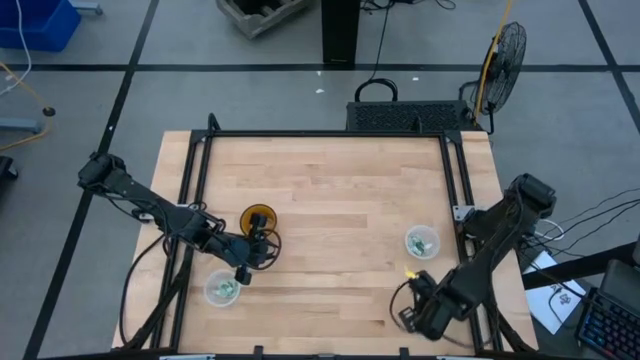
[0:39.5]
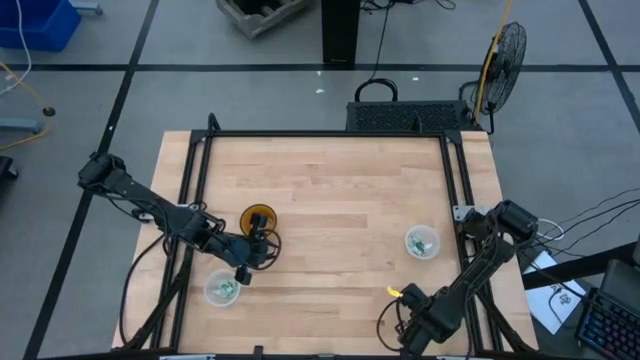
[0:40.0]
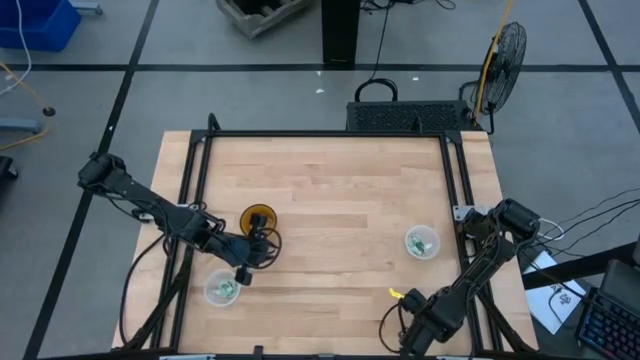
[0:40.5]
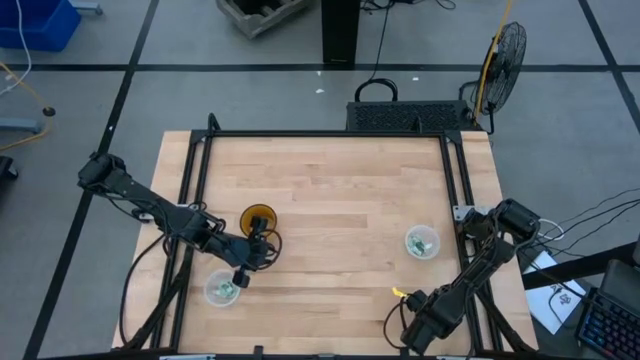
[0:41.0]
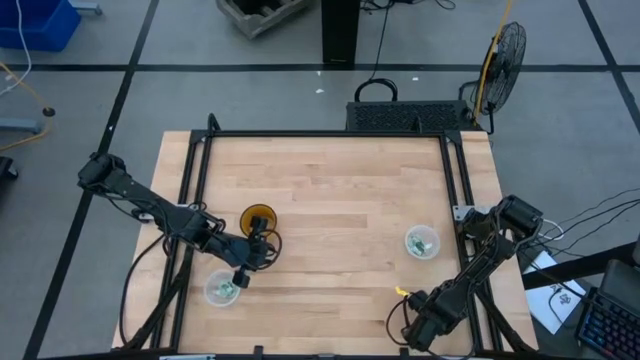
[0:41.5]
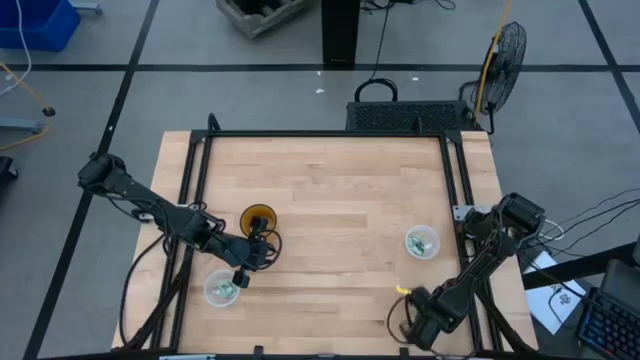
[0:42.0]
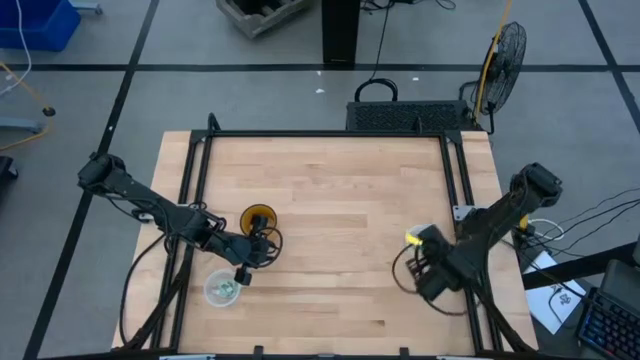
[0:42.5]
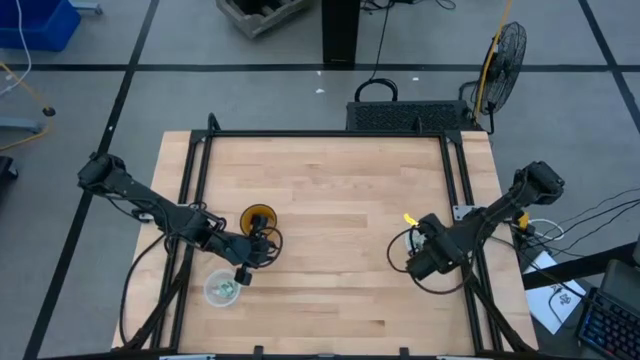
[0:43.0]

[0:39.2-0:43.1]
Task: Pick and place Stevia / Truvia into bins
Put the stevia packet into the right transparent container

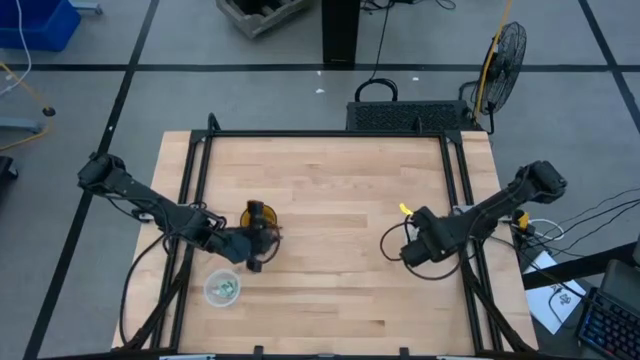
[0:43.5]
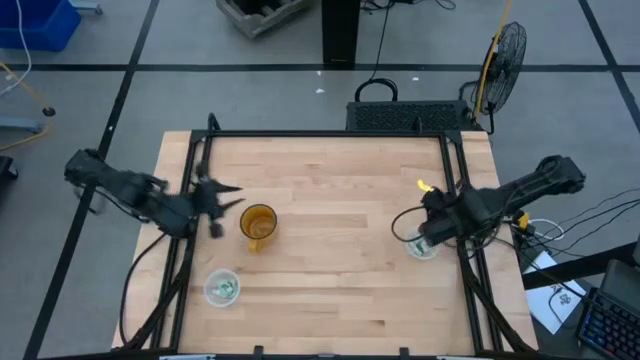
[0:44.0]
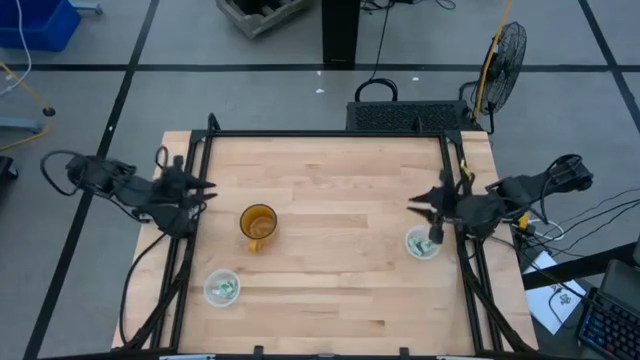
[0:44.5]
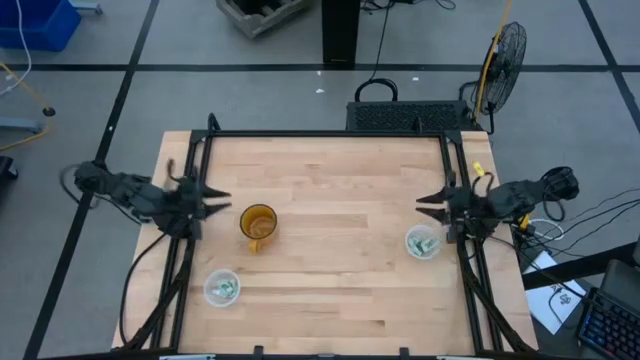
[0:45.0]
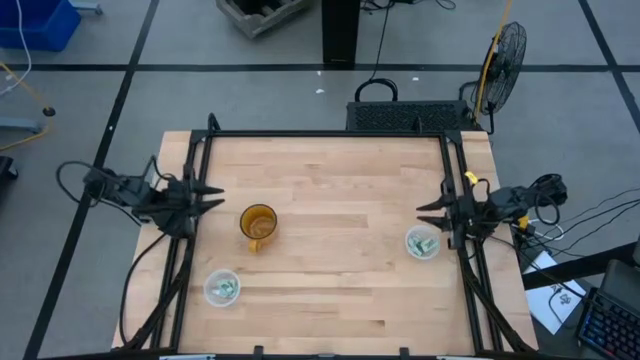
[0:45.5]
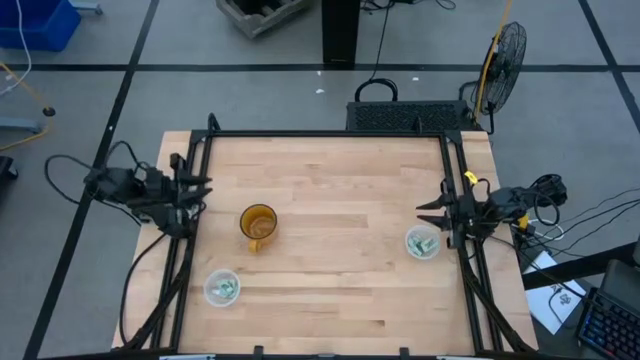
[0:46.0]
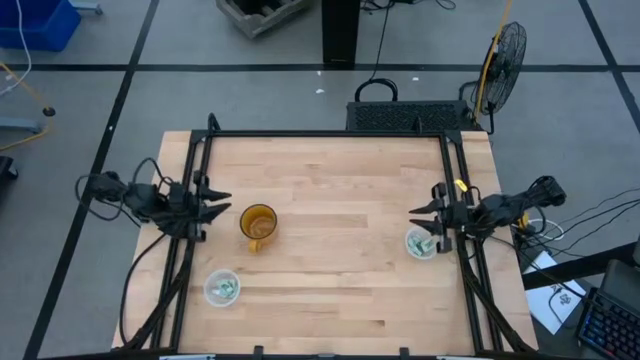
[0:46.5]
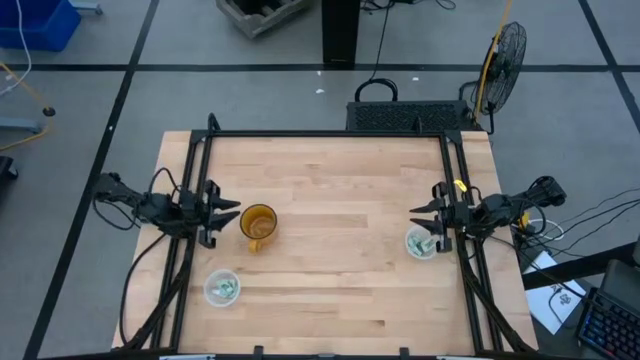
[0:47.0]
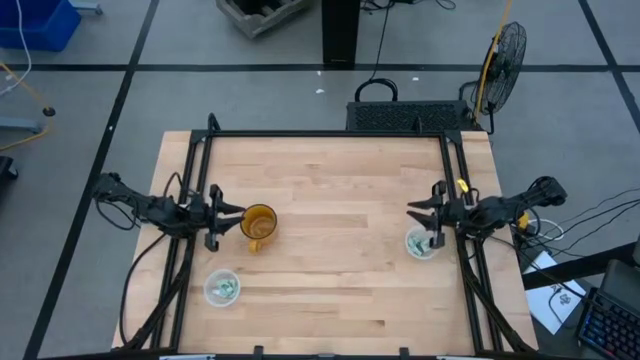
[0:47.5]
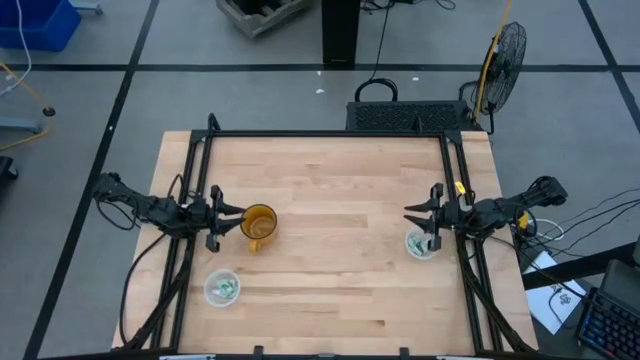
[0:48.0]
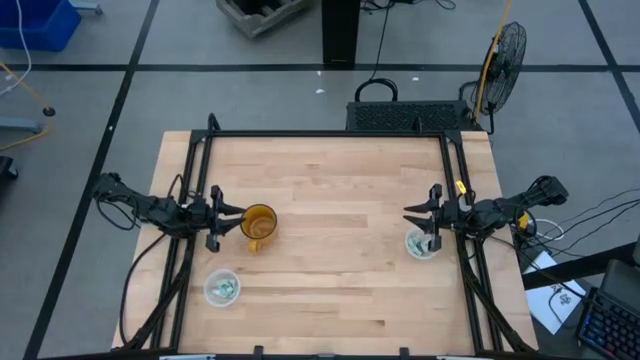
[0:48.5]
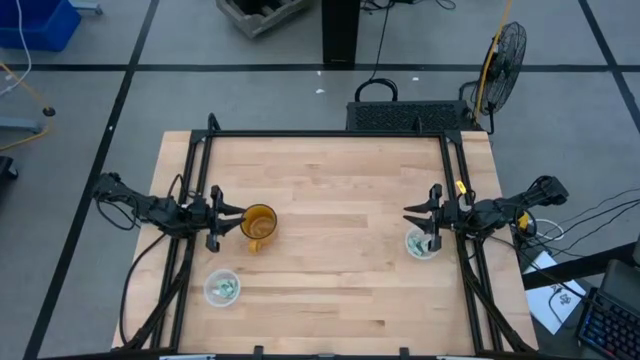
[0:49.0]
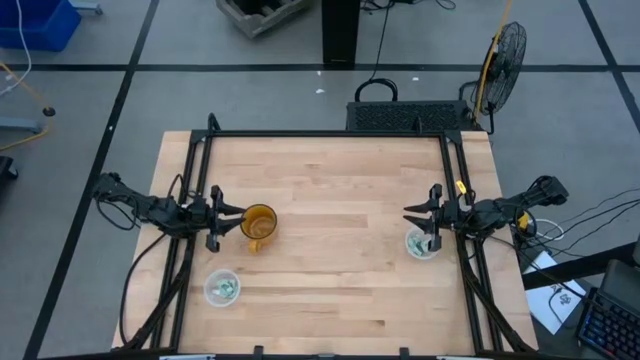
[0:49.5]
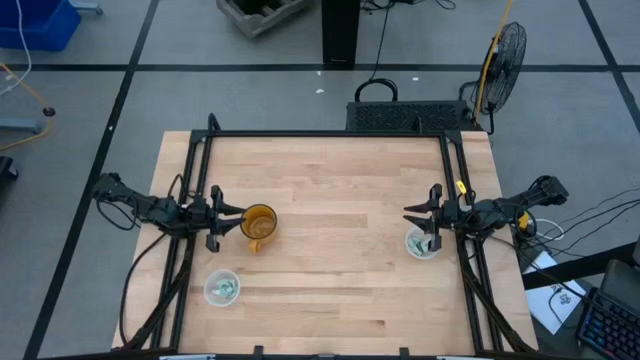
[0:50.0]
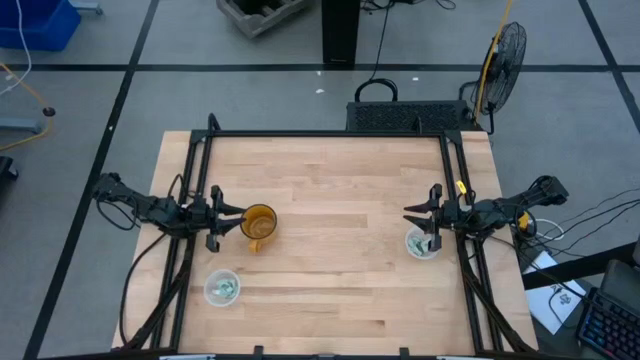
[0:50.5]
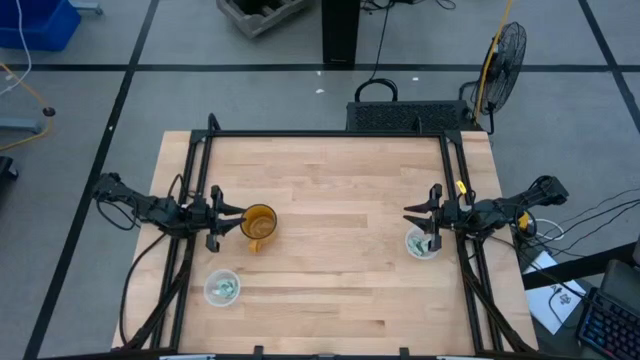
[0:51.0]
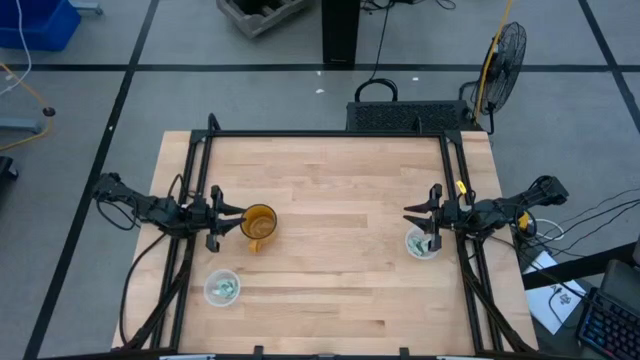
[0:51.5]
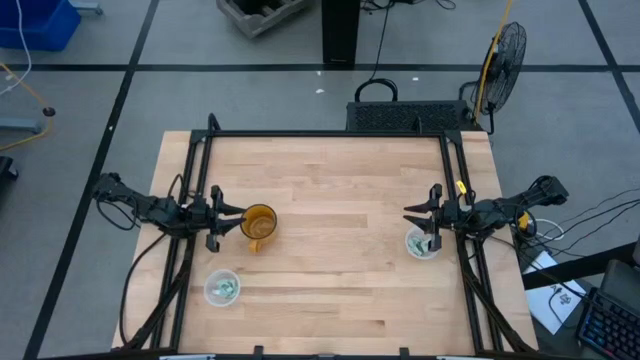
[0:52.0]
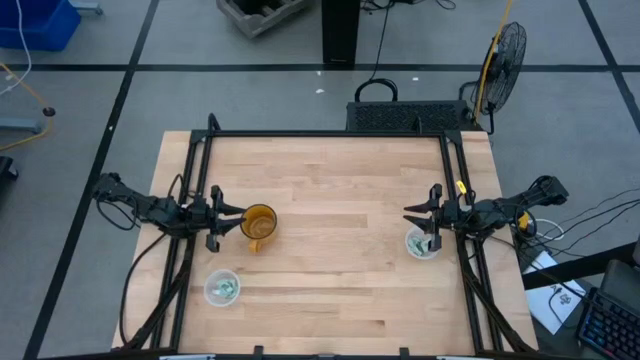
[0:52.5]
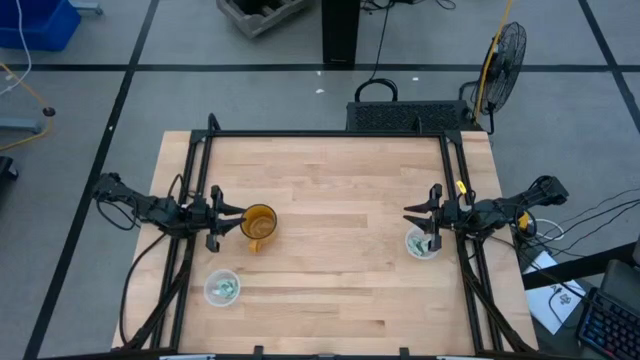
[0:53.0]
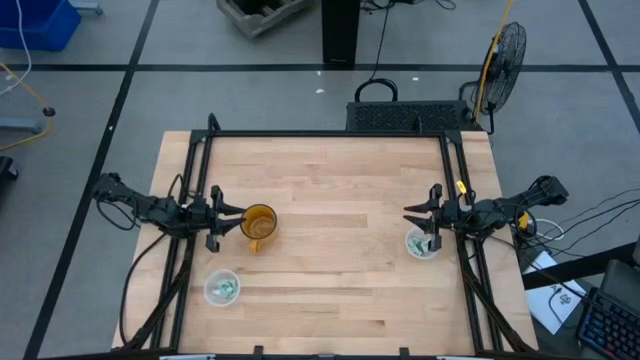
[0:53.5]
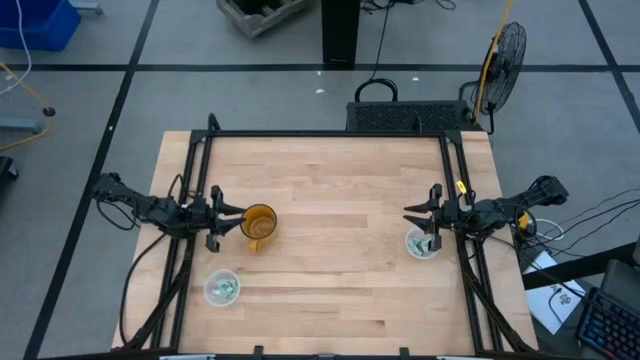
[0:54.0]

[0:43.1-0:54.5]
Return to Home Position

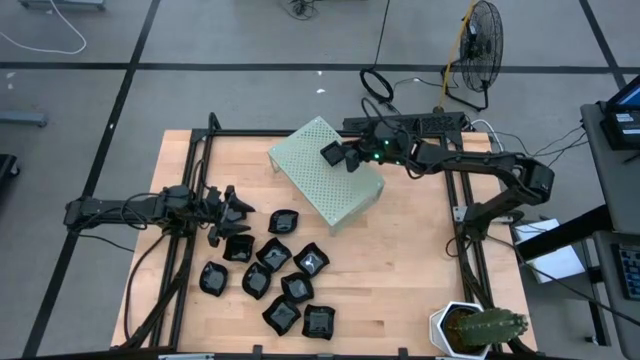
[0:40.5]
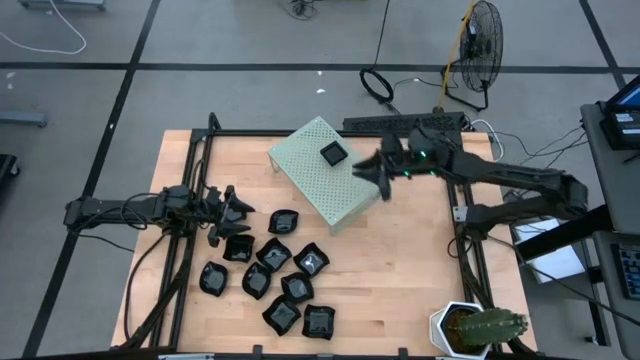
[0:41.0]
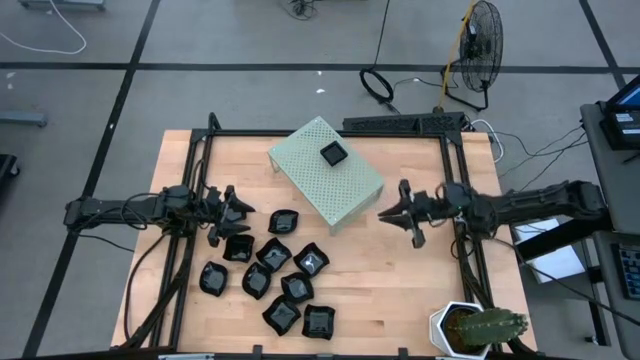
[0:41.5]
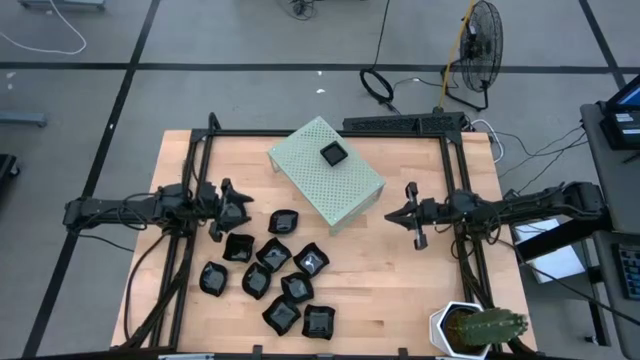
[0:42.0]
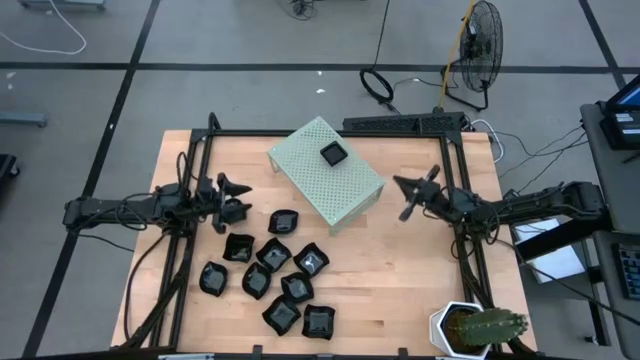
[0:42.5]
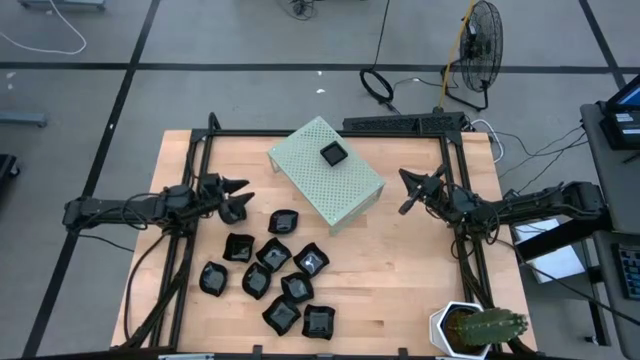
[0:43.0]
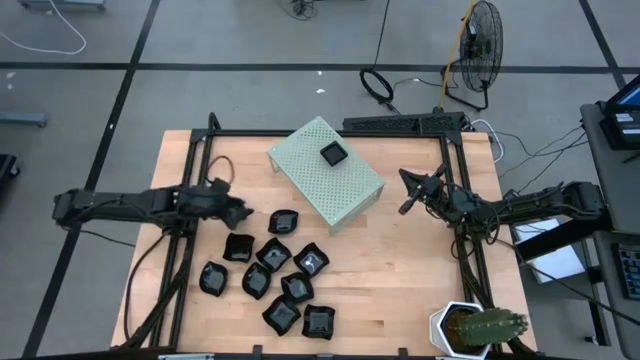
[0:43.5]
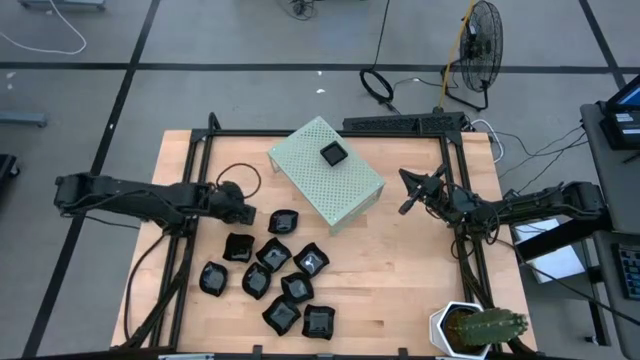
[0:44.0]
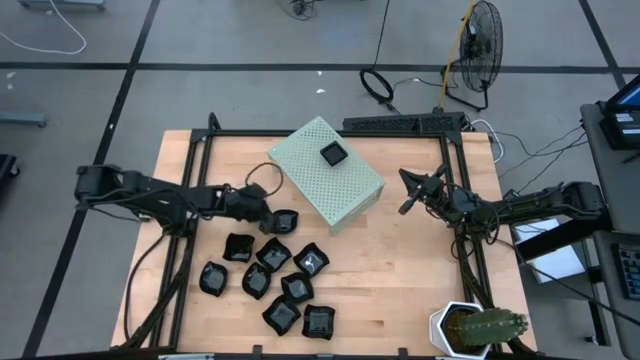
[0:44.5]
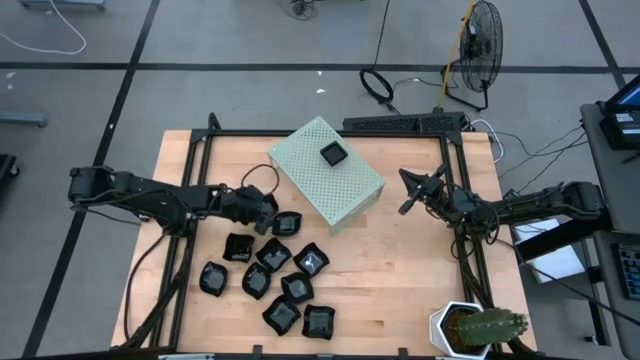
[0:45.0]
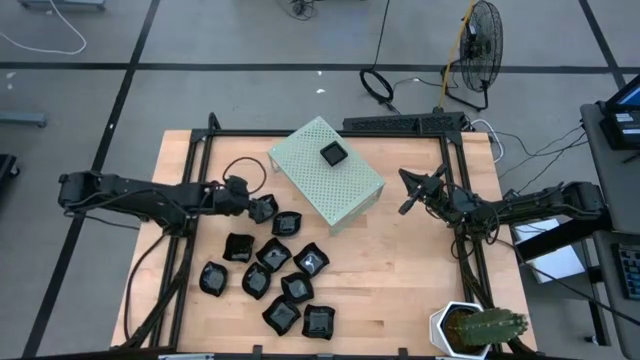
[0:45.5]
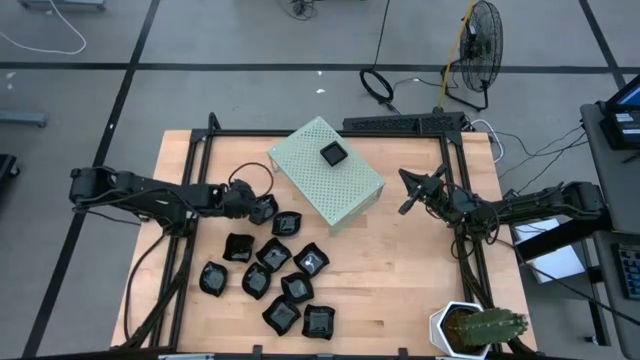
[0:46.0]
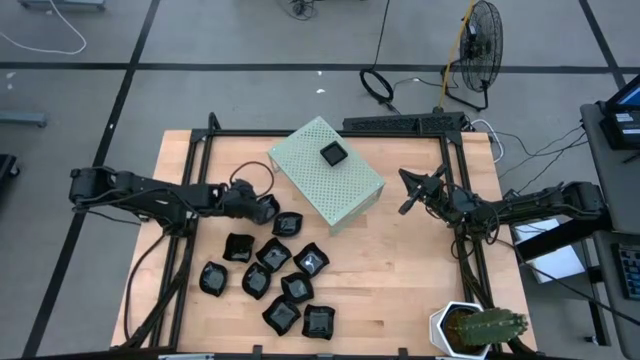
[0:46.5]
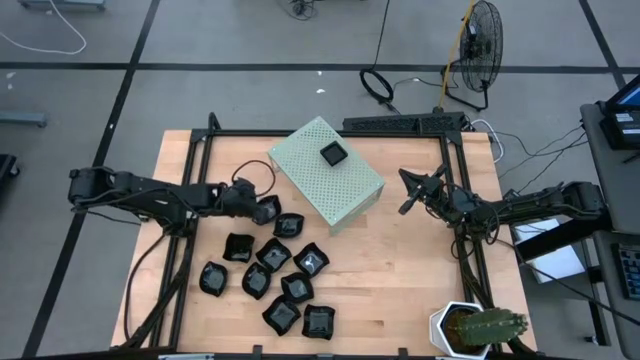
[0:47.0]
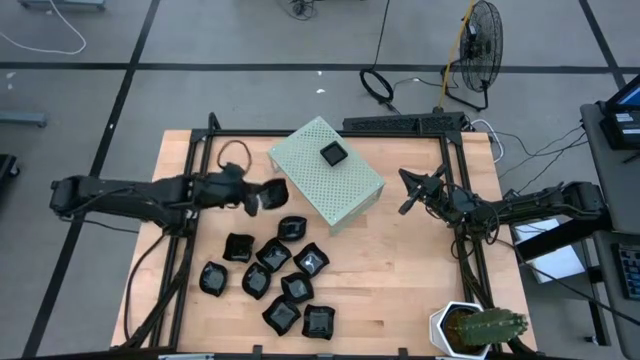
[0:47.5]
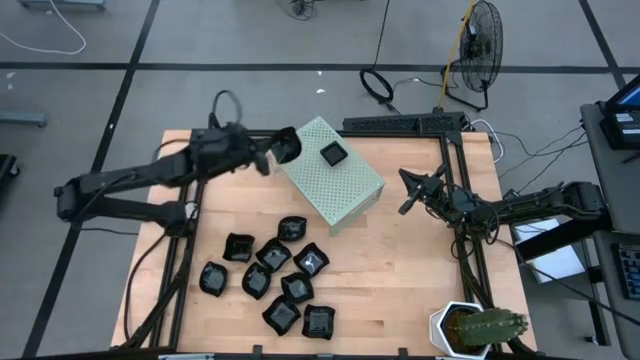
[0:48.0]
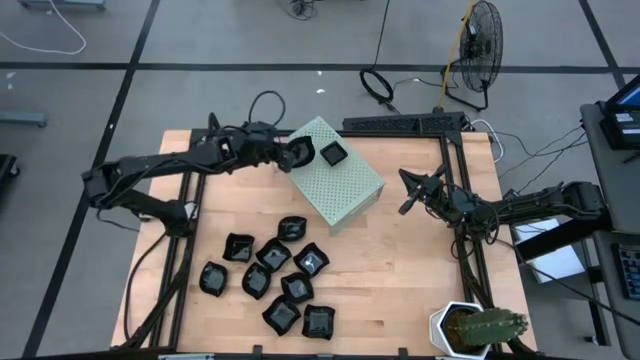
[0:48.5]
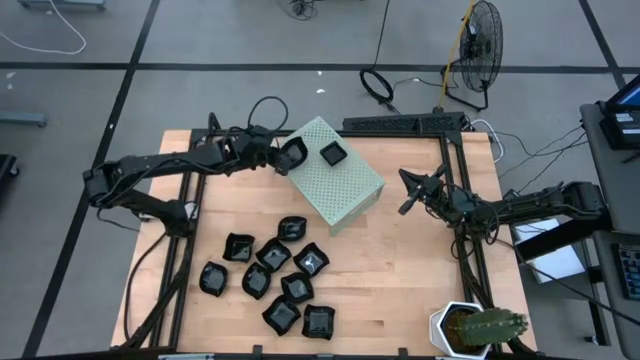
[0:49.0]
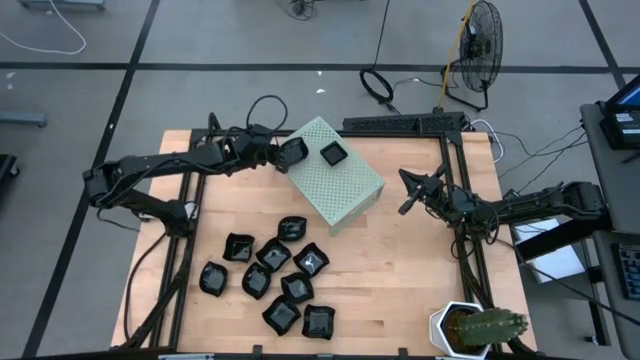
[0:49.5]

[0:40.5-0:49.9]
Task: Pick & Place Mini shaped plates
Put the leaf-shaped plate on the shelf
